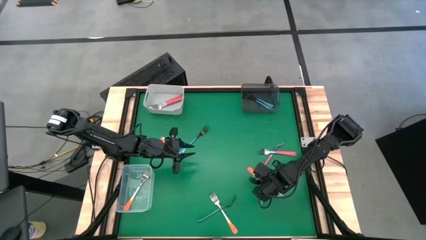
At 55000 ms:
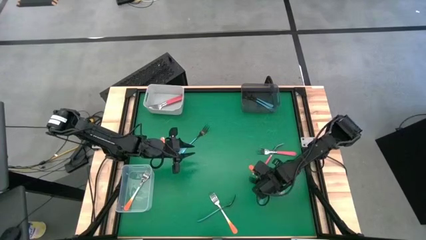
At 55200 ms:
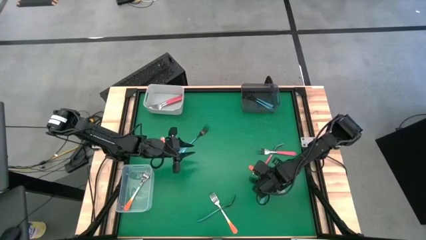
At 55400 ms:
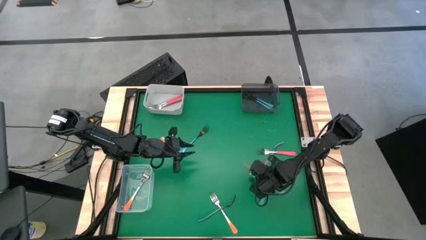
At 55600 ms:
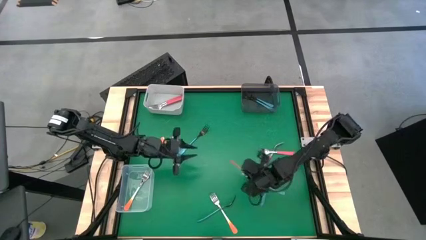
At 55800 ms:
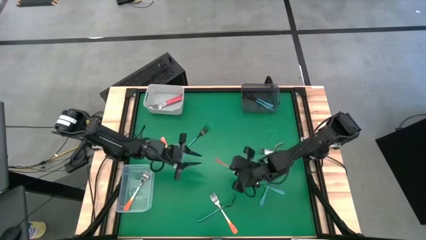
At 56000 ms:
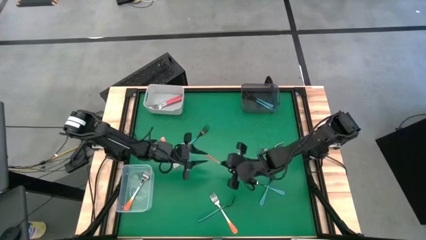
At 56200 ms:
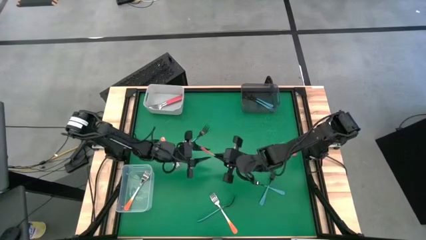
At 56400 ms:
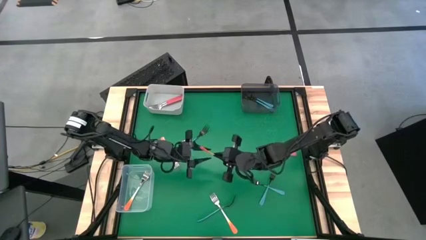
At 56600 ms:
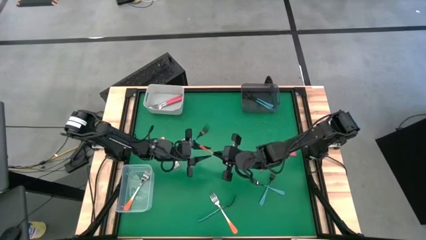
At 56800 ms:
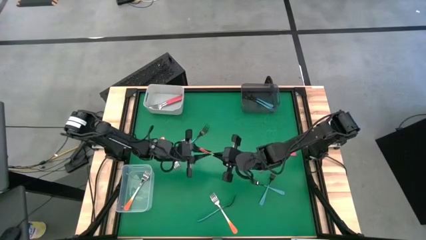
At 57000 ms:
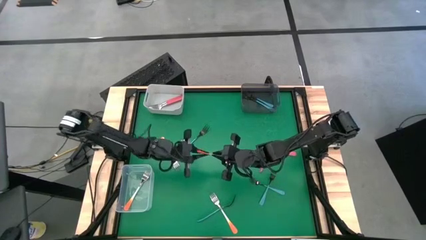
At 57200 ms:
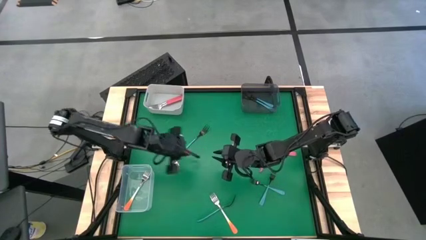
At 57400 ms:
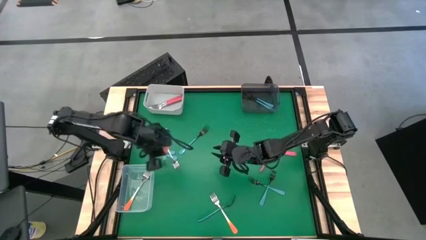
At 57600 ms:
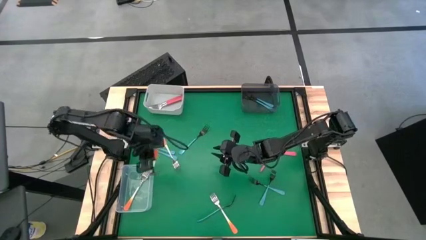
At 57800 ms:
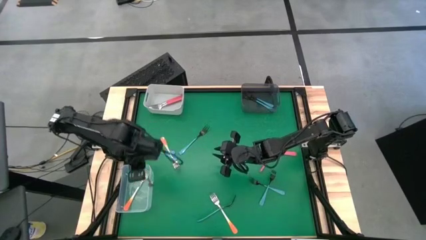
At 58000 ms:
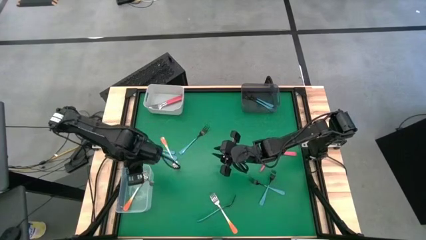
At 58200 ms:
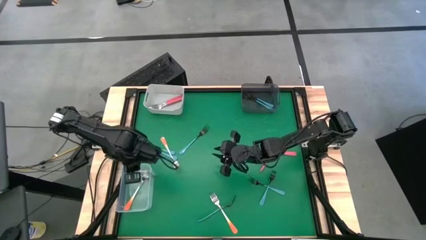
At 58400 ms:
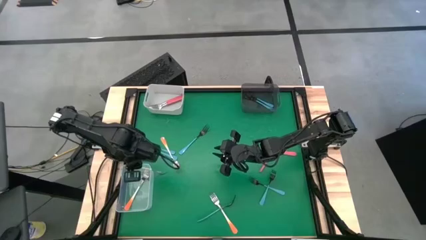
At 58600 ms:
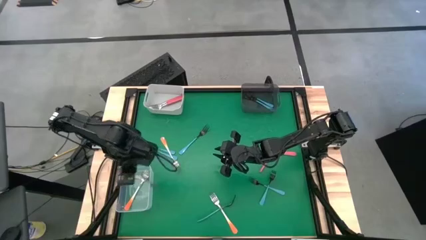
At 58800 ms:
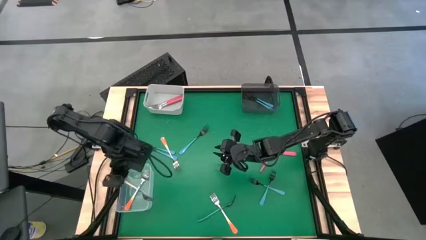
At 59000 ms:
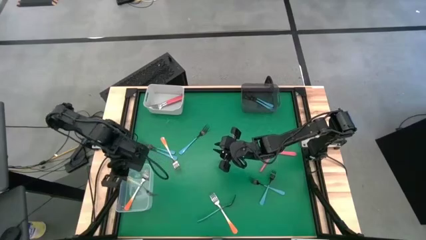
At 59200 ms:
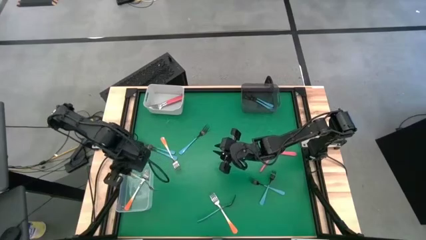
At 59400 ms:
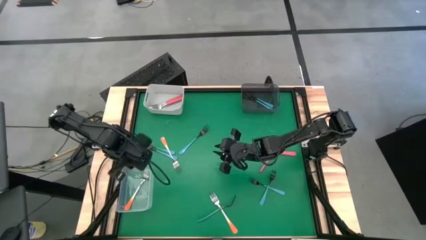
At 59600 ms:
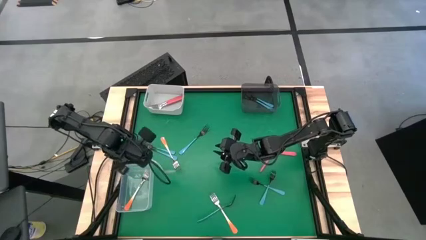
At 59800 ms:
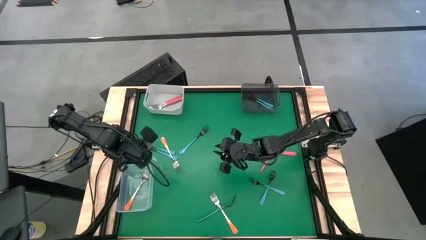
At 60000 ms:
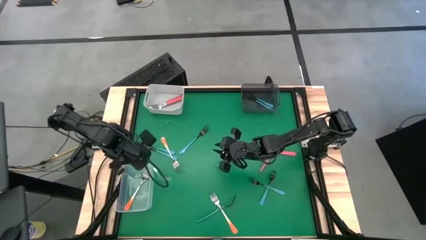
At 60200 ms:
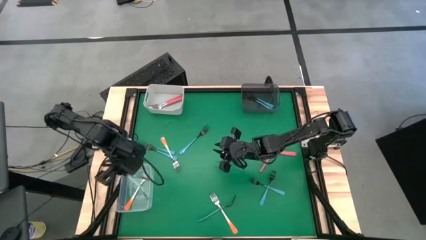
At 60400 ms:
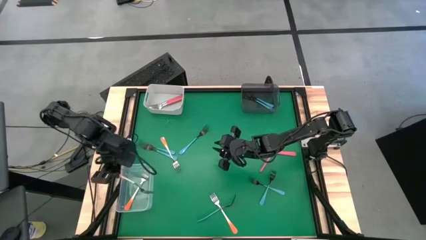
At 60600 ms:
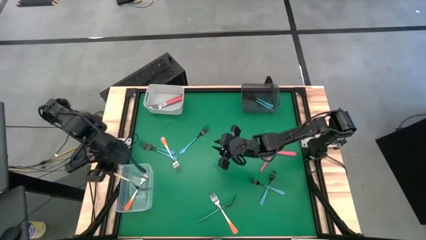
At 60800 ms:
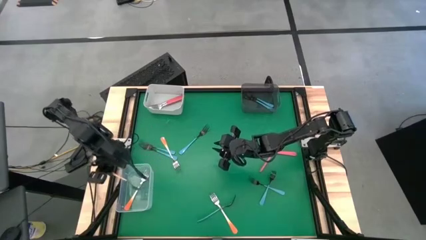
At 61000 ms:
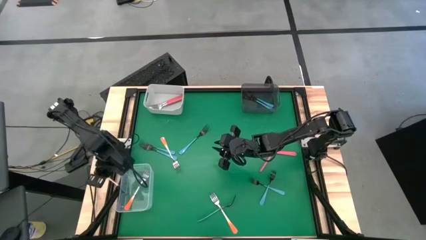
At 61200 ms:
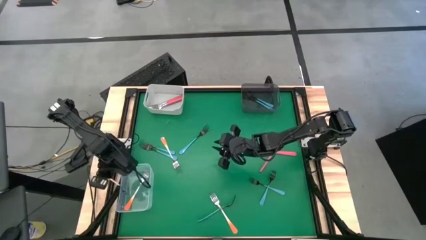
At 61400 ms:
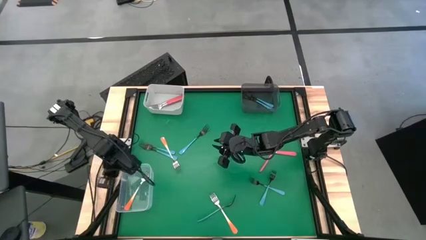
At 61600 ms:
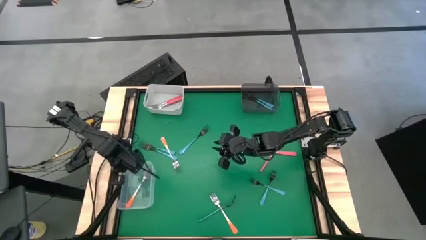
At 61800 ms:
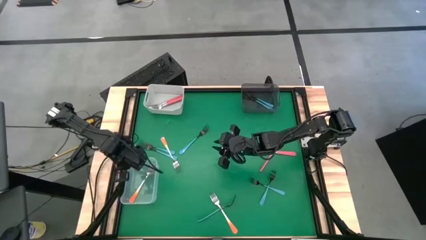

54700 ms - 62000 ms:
Task: Sort silverware by color (type)
Put the orange fork into the transparent bin

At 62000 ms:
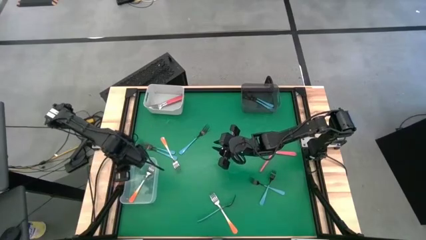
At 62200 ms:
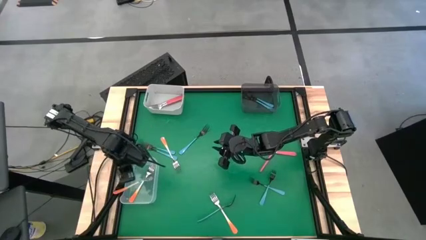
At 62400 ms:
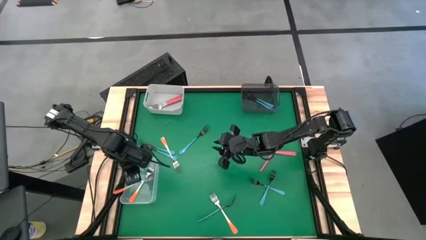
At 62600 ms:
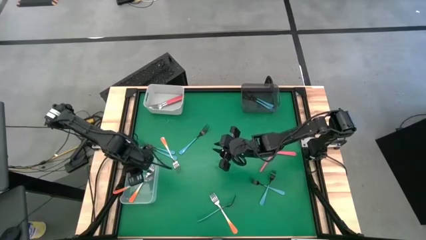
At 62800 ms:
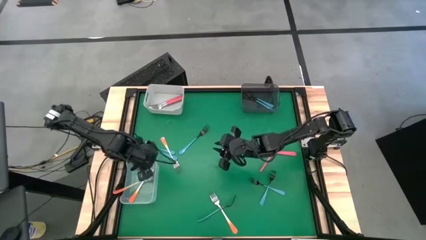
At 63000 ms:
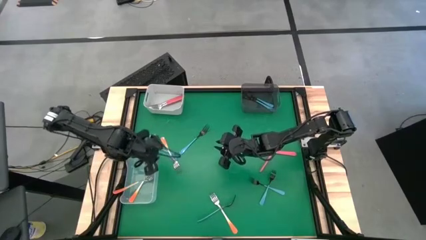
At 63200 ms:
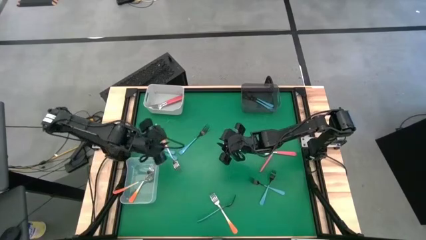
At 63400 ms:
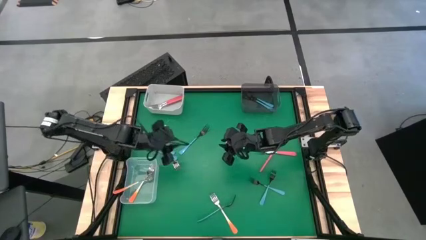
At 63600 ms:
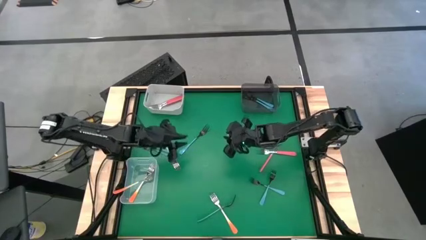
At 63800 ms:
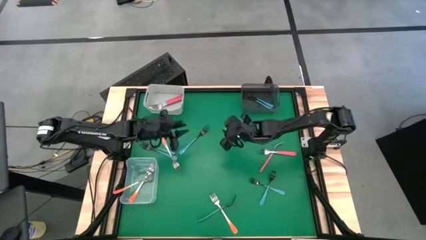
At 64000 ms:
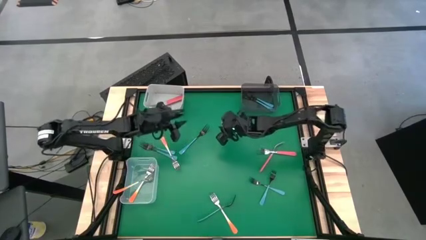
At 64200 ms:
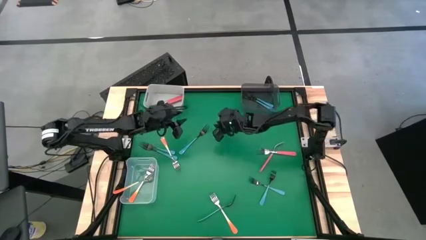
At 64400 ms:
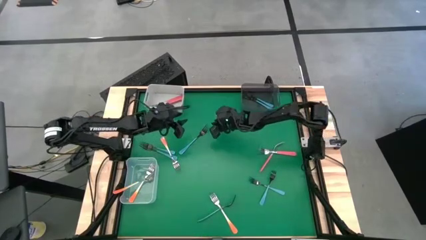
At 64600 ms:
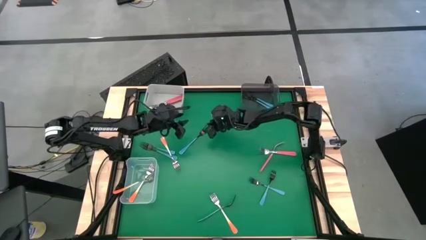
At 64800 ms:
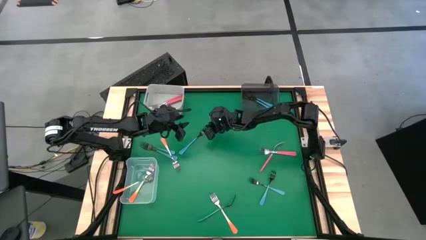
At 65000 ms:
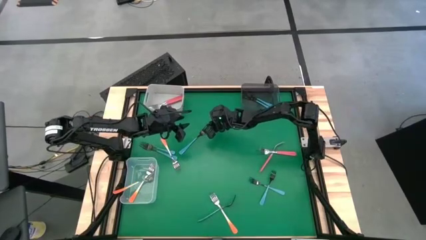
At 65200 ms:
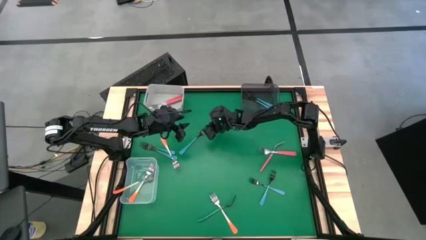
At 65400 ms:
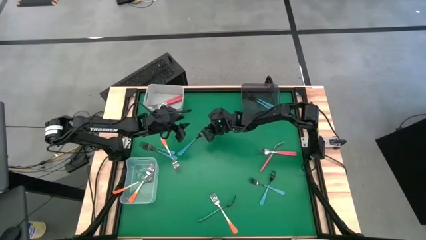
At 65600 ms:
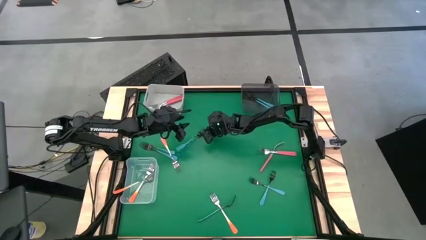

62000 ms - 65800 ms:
Put the blue fork into the black bin

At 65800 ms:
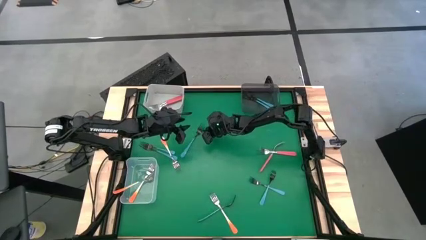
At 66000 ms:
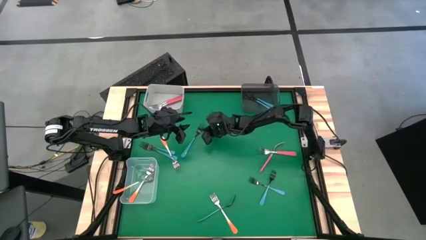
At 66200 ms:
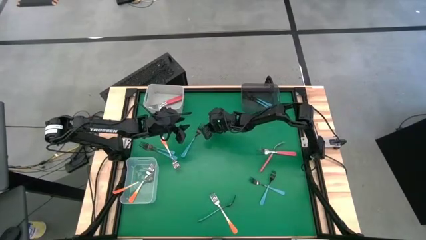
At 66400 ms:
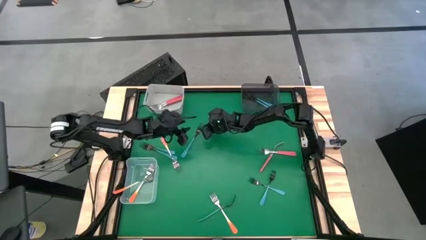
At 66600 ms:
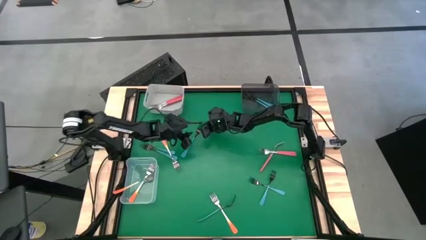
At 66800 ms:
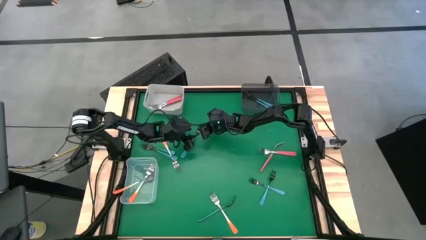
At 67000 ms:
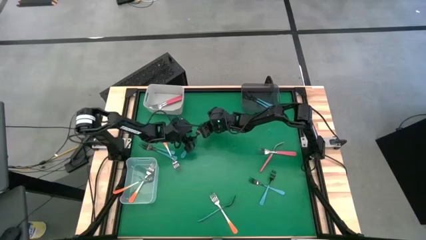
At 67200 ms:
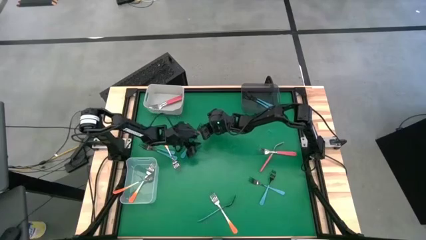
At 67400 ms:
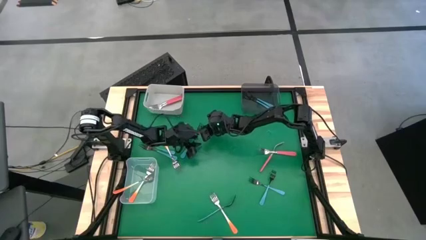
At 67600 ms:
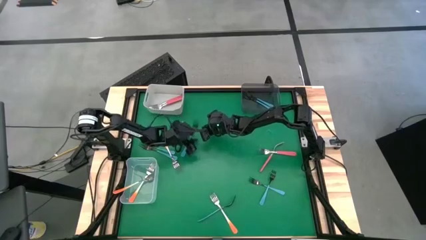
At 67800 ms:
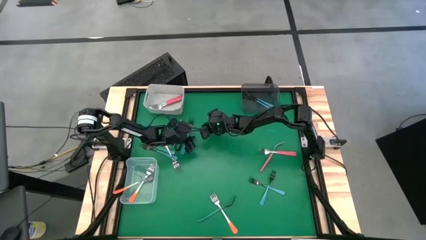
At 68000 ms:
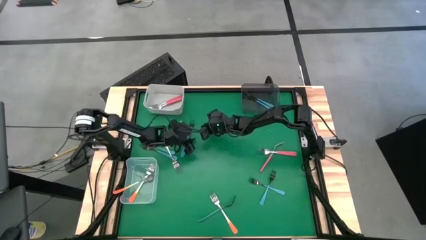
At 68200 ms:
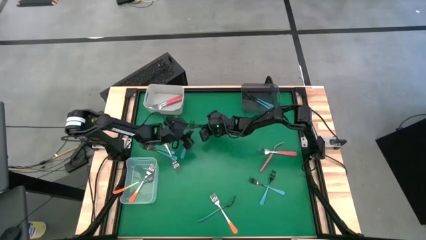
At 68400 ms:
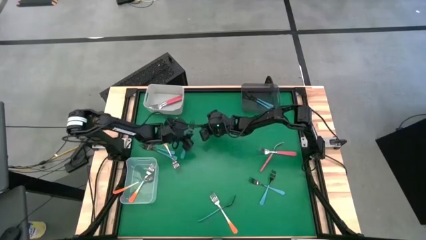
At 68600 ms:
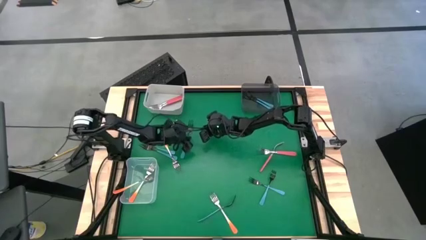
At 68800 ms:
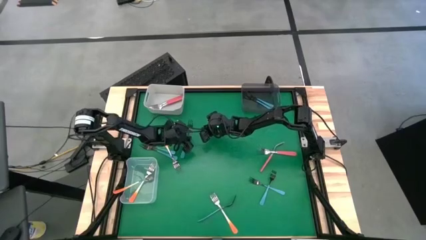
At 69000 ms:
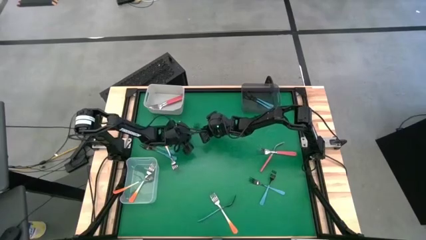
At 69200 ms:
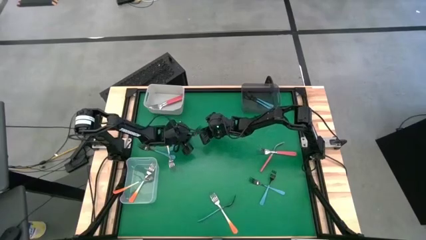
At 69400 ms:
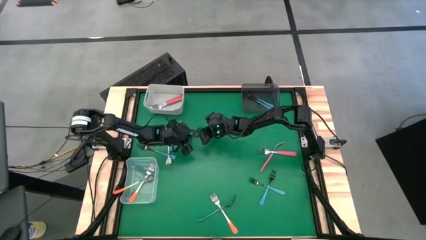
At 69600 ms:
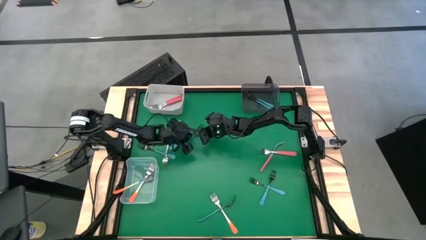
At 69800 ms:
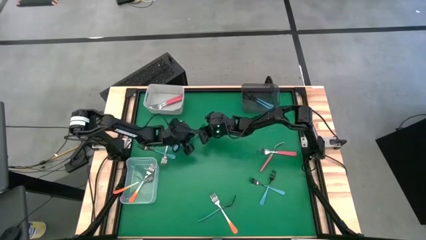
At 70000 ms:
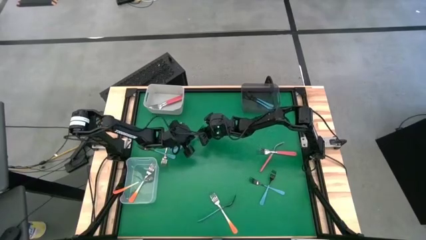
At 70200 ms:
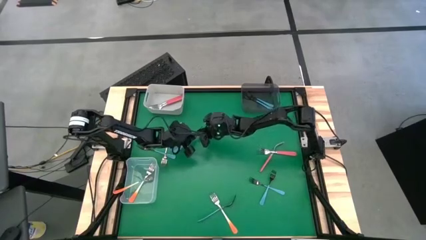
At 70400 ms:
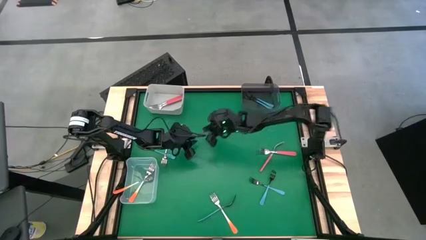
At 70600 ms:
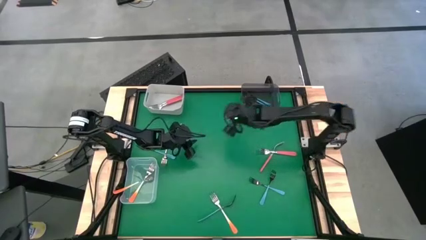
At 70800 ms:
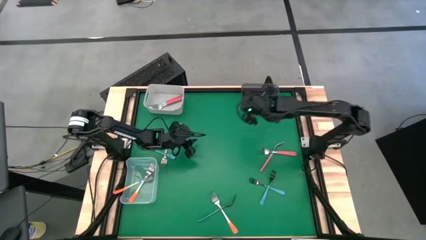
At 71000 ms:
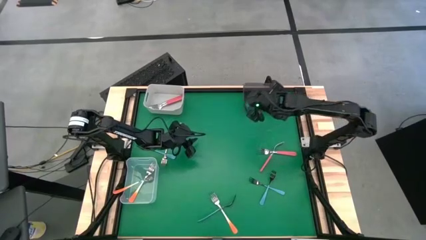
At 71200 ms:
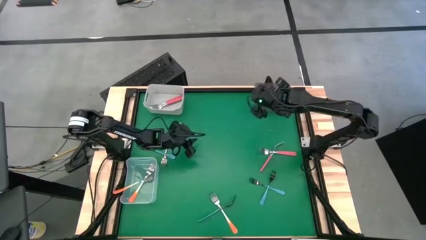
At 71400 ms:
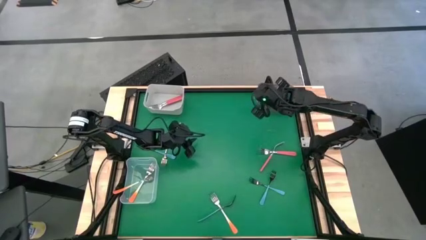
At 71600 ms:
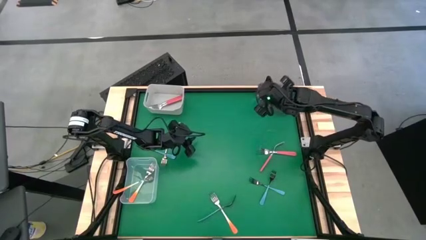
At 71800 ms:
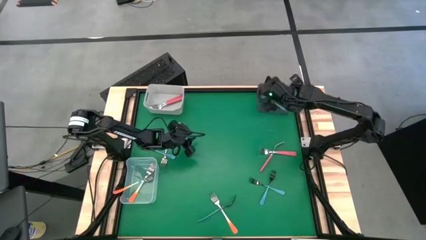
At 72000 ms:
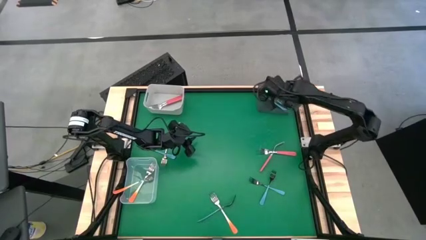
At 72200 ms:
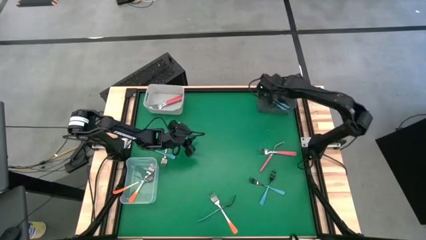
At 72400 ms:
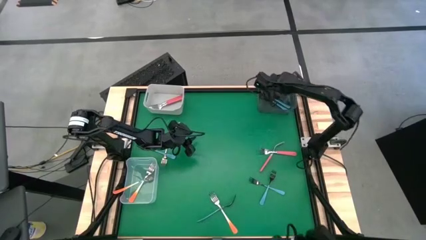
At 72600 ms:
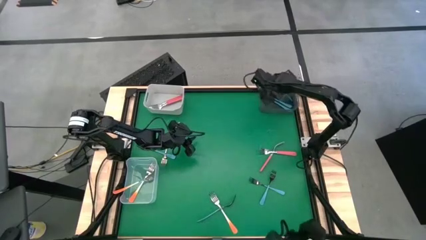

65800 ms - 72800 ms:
Put the blue fork into the black bin
